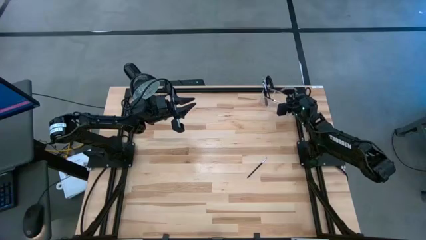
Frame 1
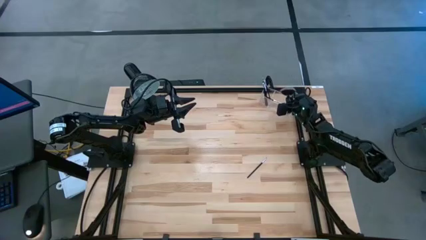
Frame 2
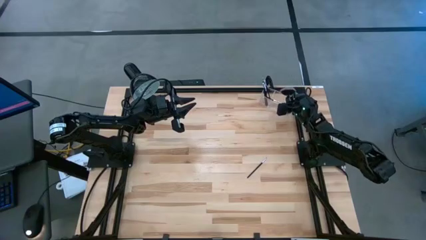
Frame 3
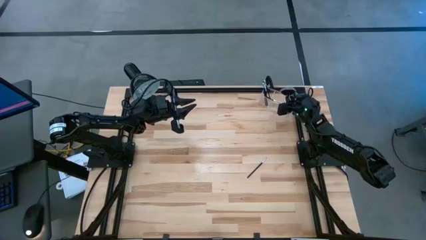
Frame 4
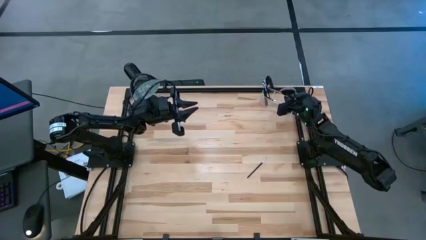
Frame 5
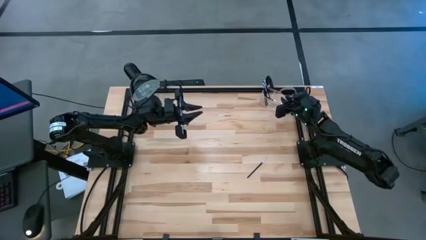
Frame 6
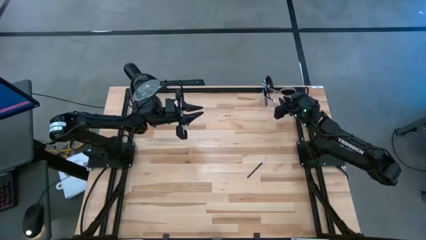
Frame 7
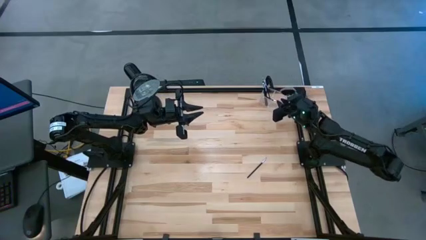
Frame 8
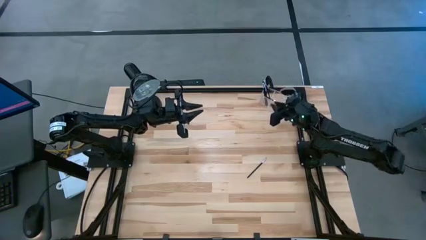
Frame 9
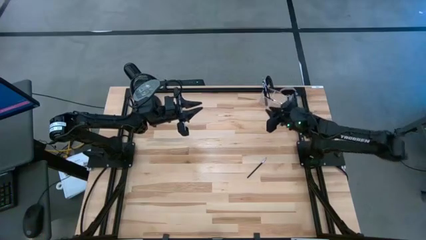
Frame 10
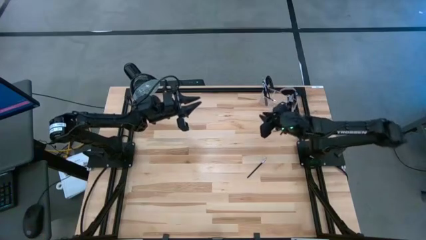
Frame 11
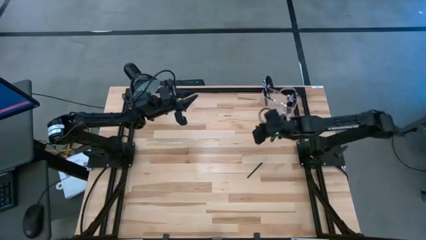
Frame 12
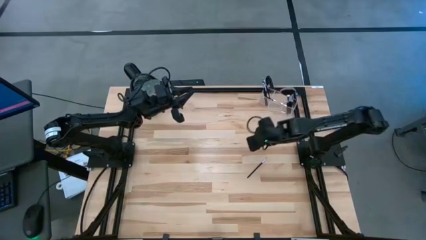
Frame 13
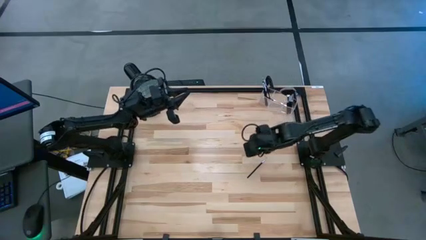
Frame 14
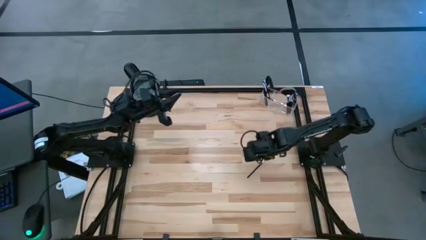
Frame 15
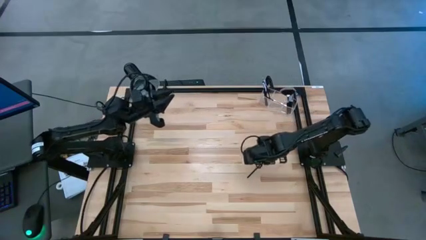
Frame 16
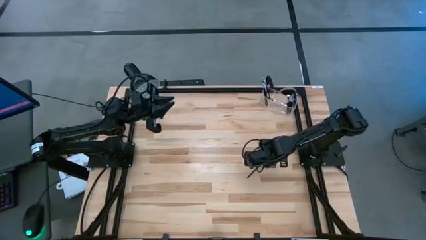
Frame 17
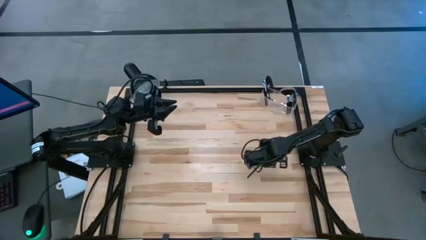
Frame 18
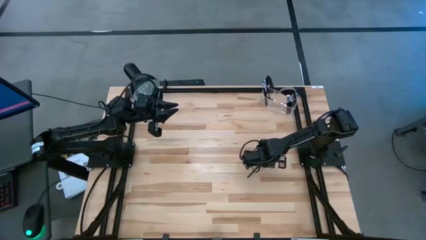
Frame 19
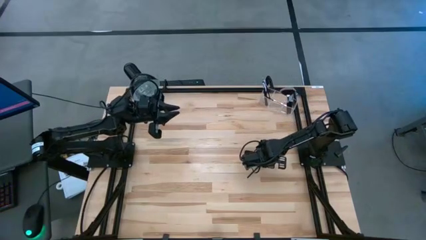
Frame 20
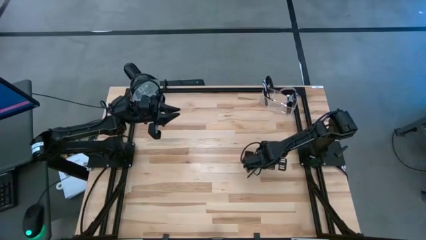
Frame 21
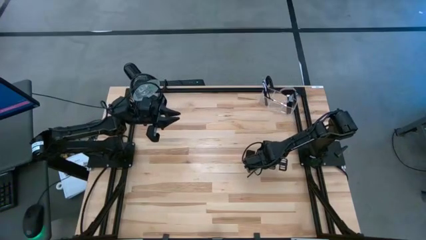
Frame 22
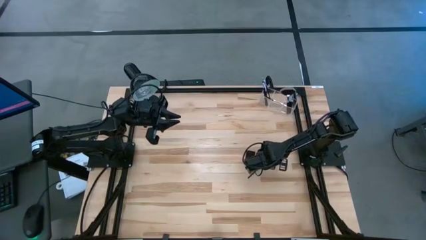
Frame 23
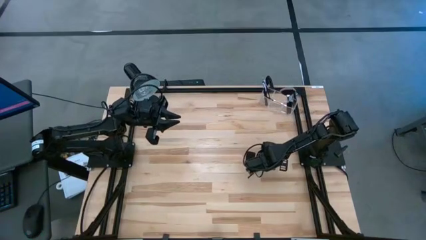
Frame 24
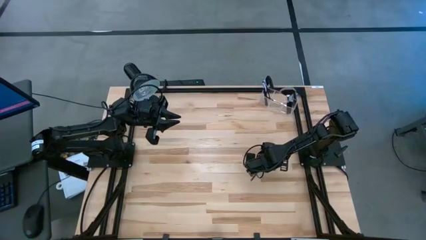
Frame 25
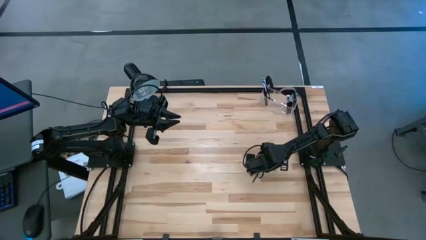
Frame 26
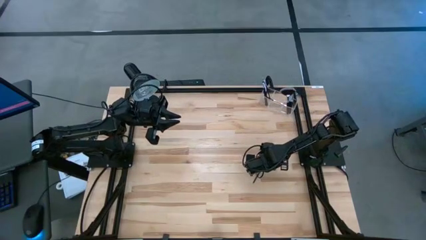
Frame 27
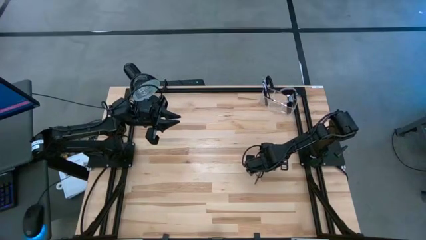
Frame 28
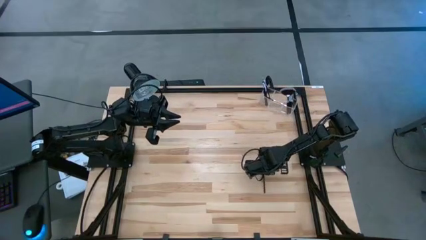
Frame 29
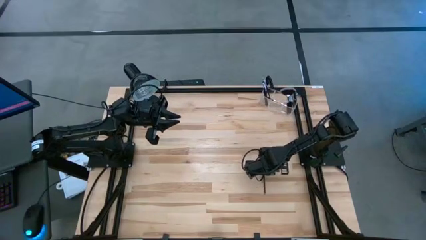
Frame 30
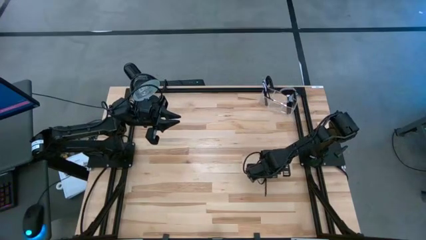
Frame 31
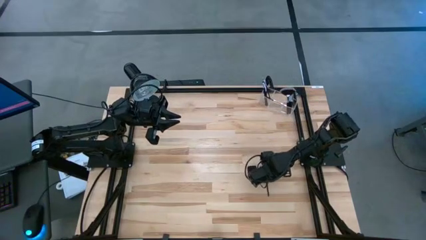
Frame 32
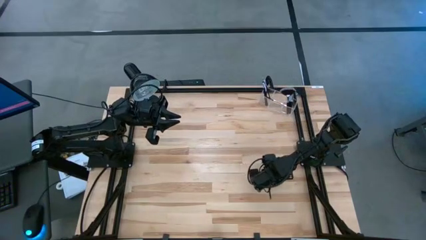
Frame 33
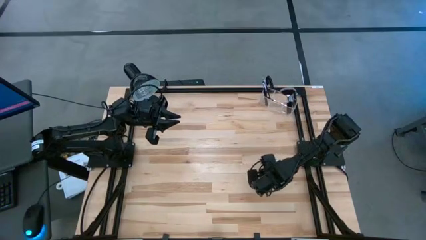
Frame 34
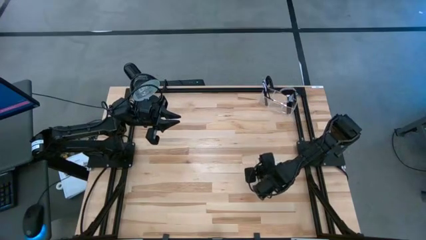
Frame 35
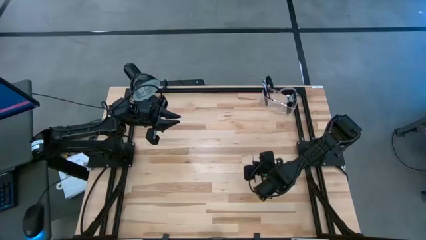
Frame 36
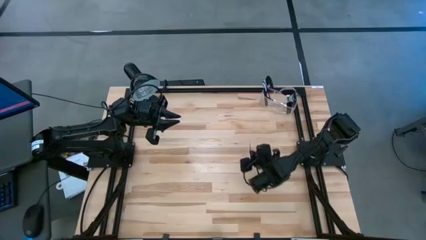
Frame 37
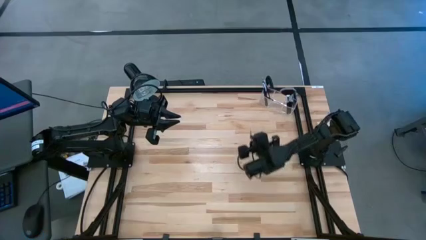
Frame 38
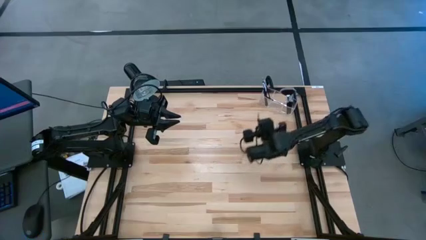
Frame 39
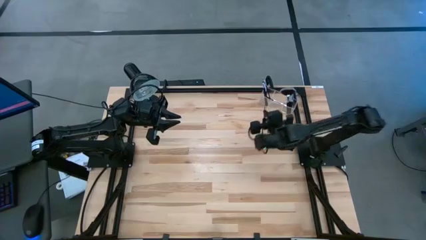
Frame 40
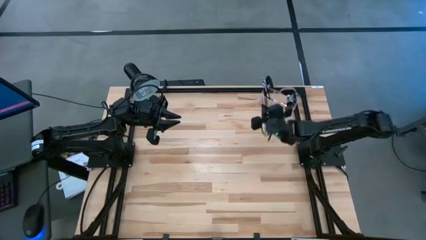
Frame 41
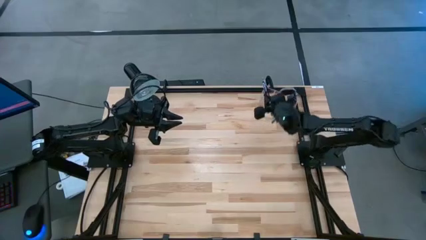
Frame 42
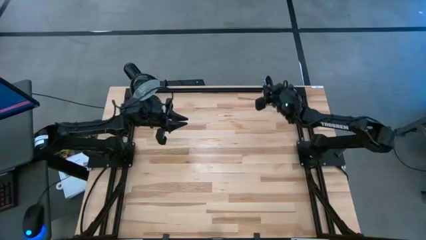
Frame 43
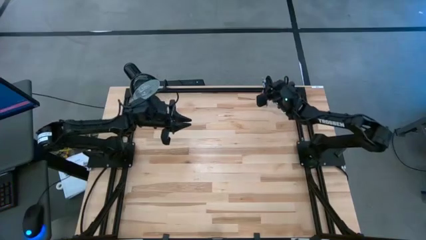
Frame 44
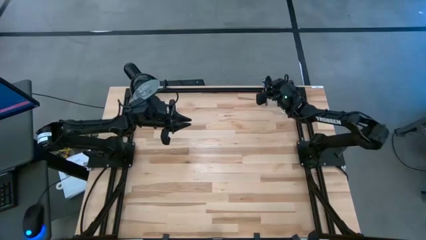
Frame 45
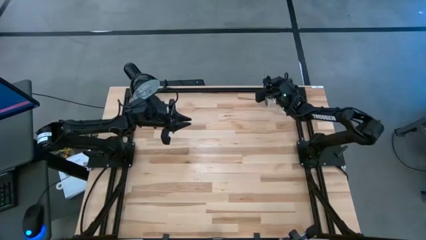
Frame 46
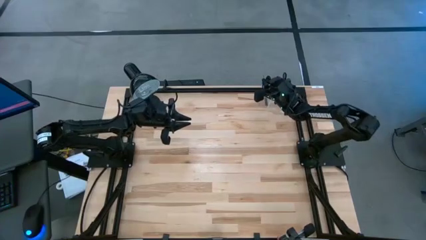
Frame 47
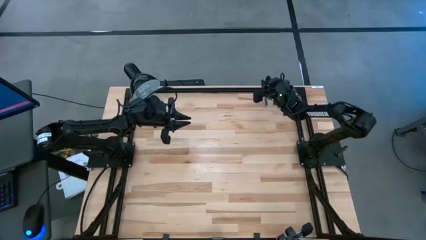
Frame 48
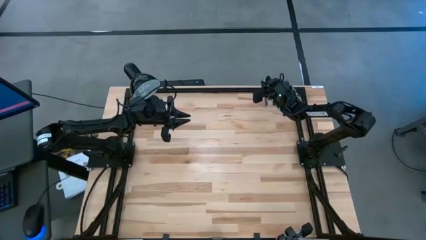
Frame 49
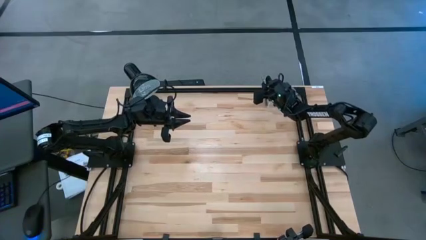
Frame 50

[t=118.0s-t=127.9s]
Task: Sort items
Put the liner brush into the transparent organizer

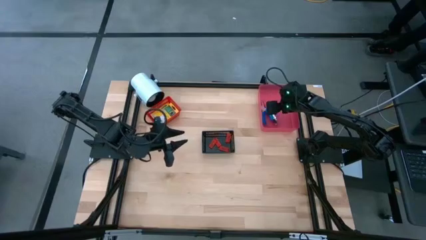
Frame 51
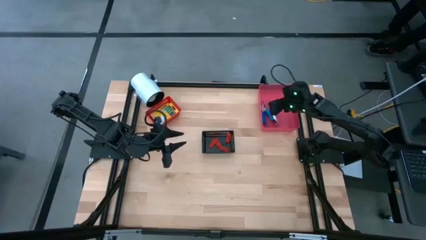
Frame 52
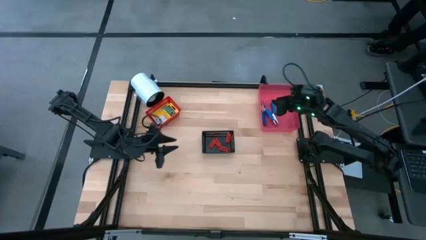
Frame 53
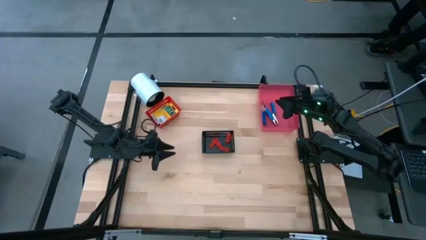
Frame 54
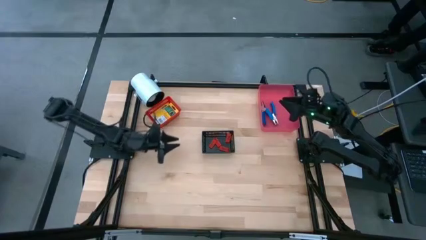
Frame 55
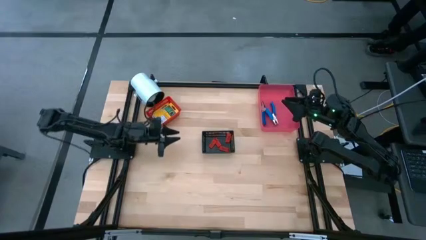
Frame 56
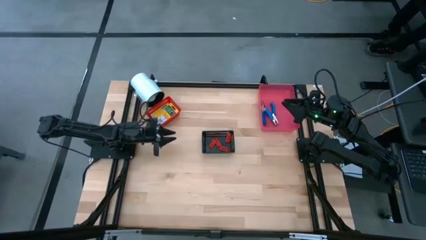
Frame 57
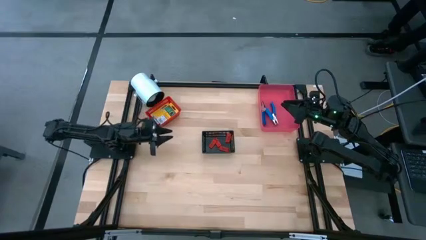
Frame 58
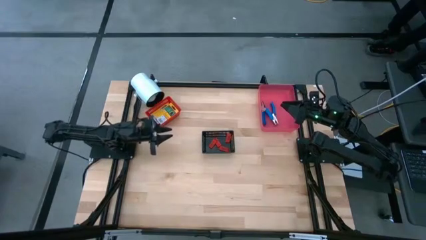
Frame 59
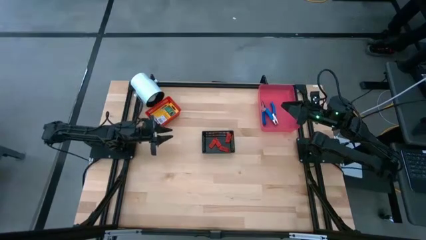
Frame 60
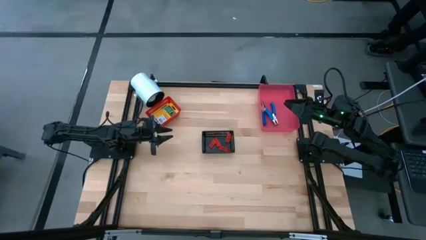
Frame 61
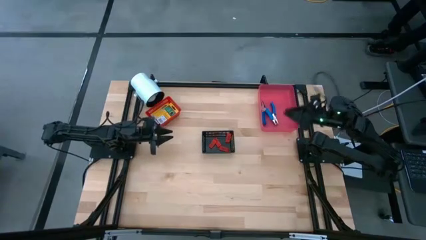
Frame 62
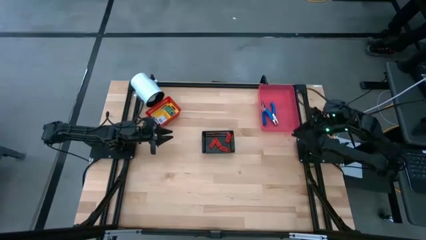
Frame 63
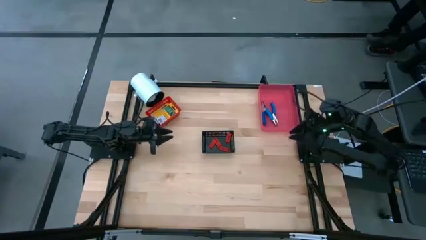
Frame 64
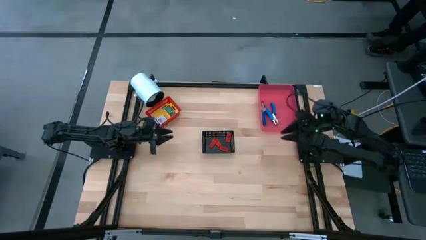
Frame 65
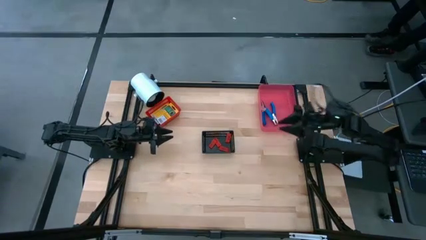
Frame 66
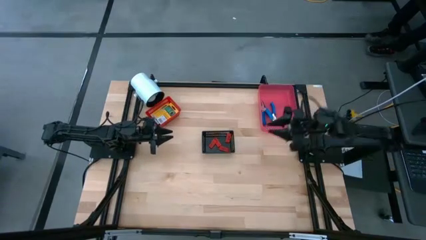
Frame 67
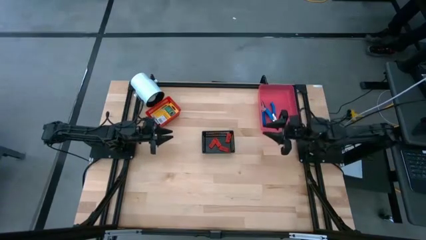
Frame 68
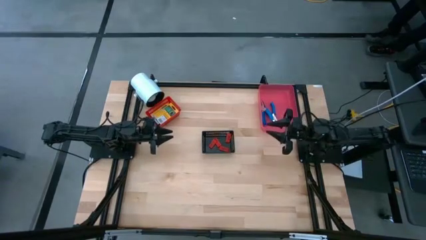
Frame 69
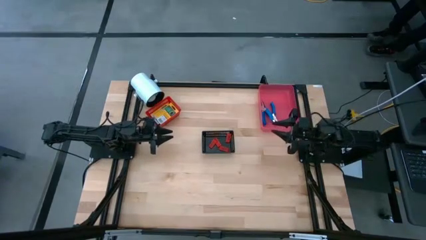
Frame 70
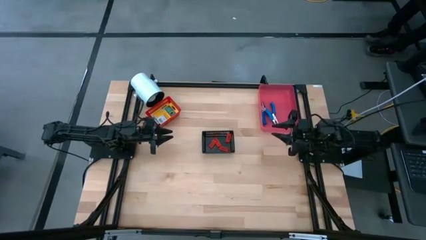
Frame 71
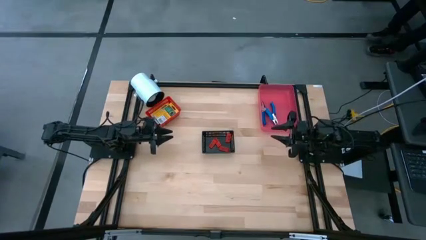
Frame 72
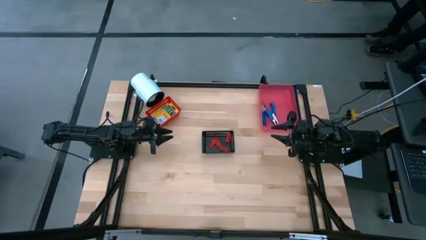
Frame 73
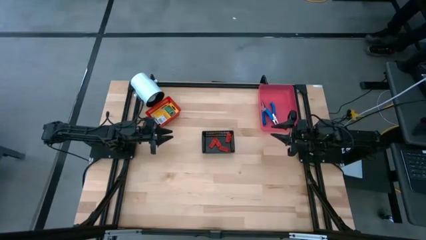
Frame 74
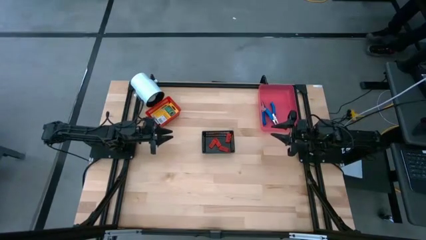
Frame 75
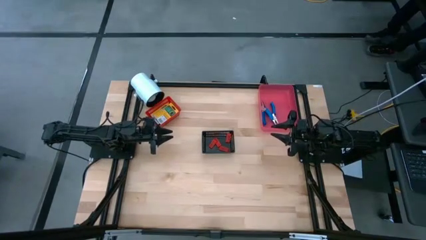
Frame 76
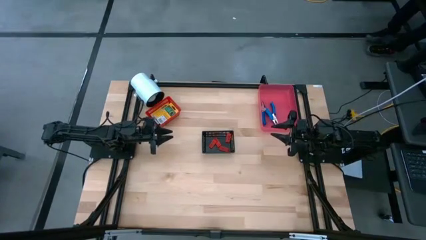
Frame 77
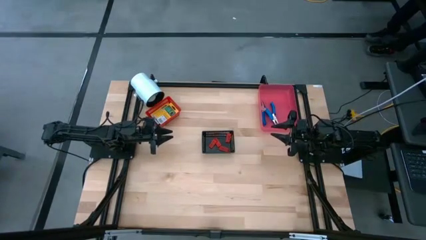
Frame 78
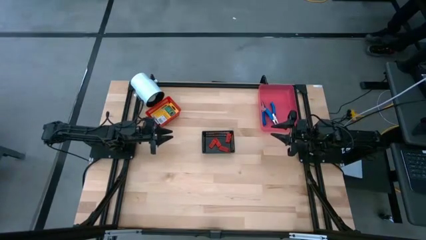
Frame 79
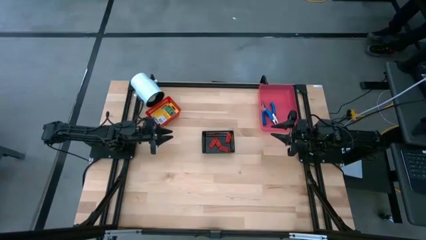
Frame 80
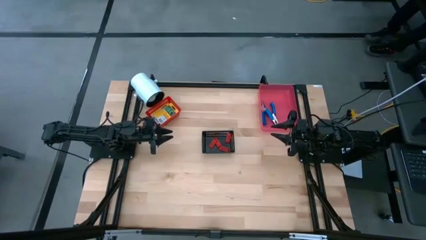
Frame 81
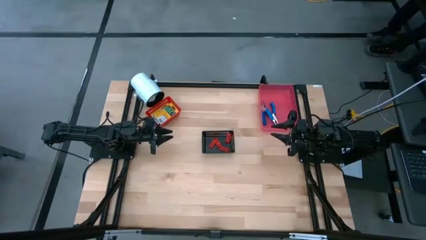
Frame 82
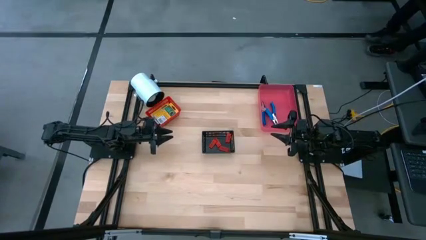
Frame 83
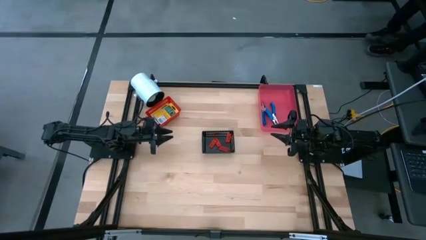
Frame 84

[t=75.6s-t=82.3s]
Task: Pick & Place School Supplies
Return to Home Position
